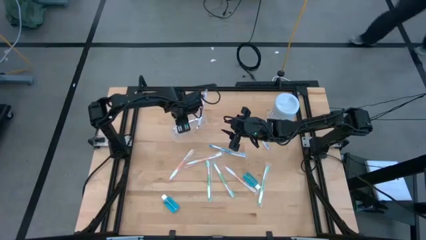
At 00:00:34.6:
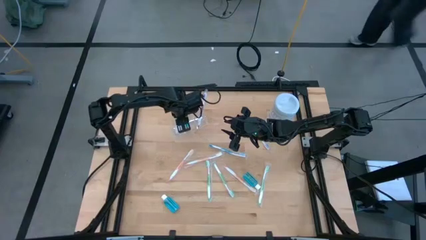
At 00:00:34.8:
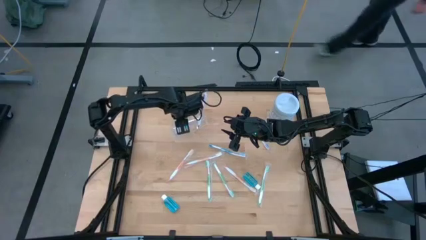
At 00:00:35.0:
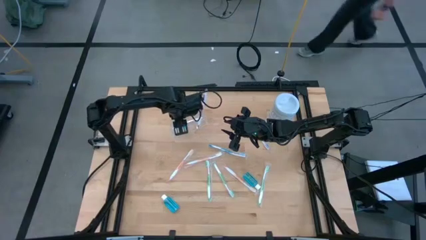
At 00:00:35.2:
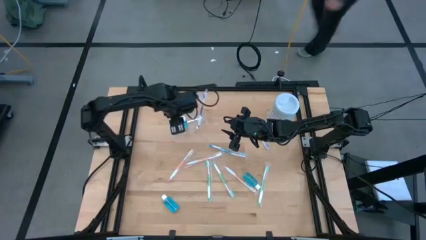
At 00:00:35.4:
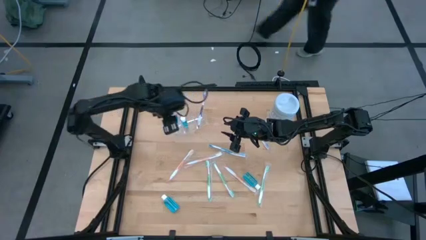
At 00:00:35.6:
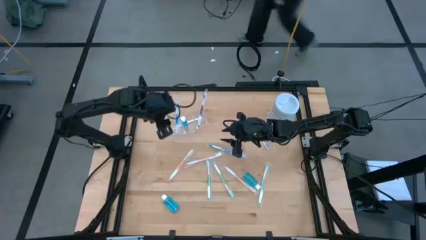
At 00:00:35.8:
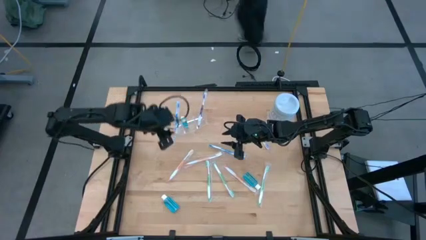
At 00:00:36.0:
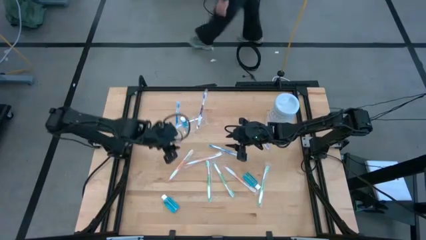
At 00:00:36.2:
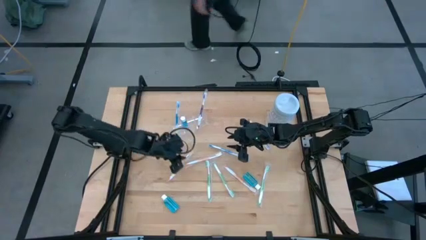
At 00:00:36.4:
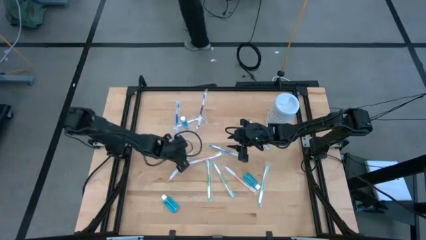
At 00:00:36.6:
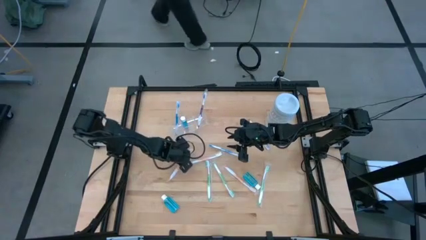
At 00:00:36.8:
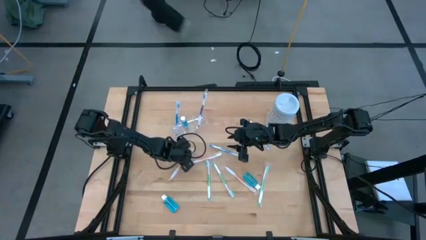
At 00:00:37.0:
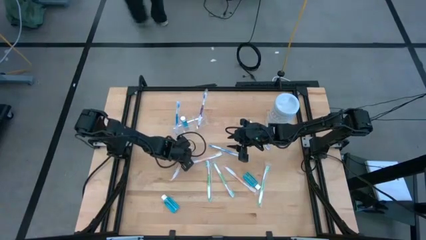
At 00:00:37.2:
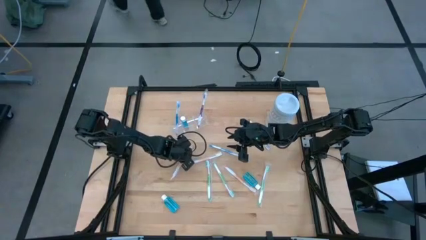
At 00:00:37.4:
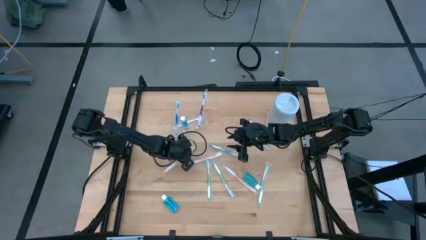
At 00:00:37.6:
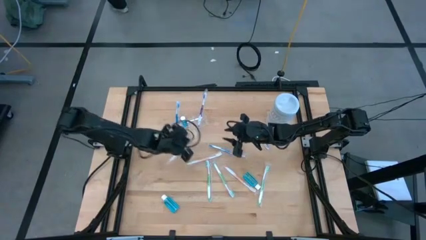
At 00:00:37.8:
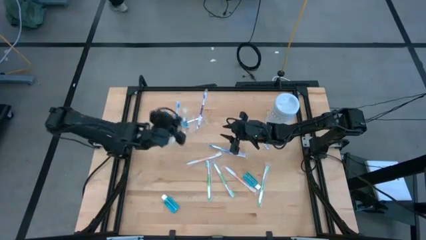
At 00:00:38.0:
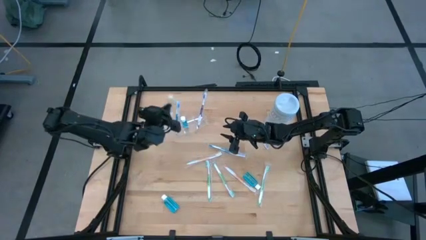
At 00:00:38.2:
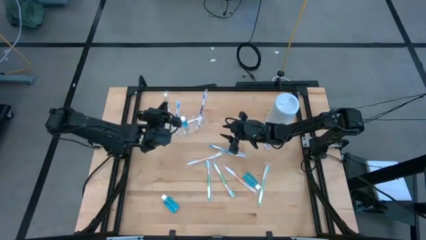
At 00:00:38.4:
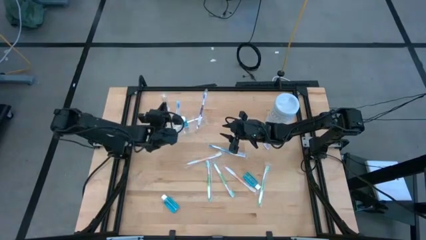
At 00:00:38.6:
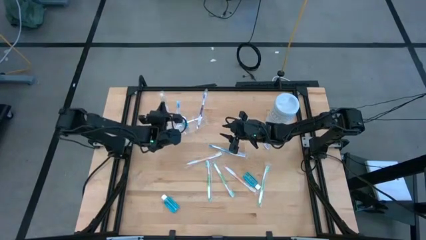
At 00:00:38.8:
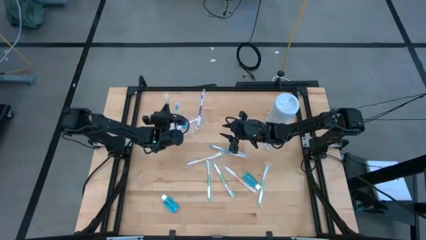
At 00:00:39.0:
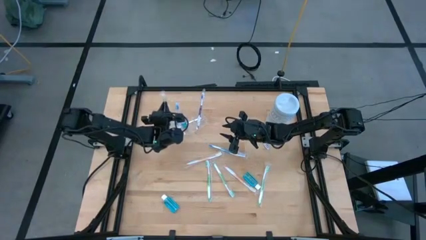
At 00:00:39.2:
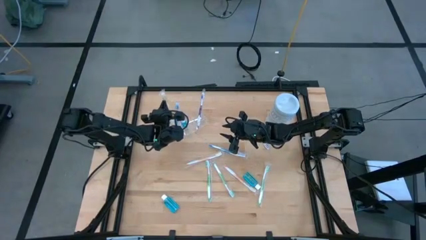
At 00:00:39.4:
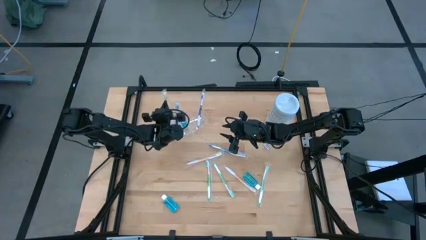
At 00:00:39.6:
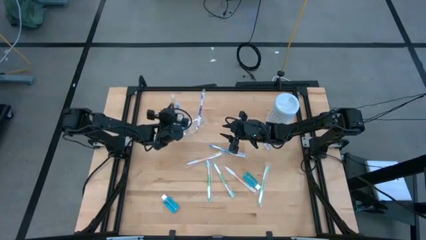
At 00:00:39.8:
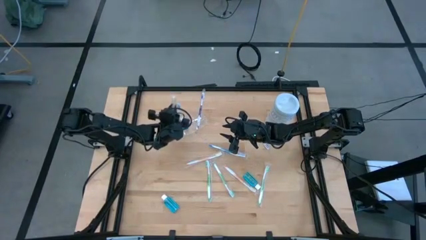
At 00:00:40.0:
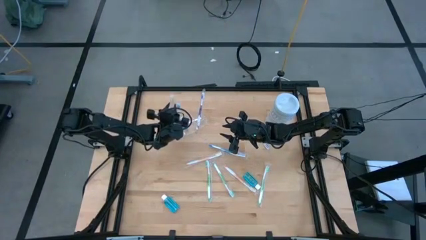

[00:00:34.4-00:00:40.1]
Task: Pick & Place toothbrushing station
Put the top left orange toothbrush into the transparent organizer

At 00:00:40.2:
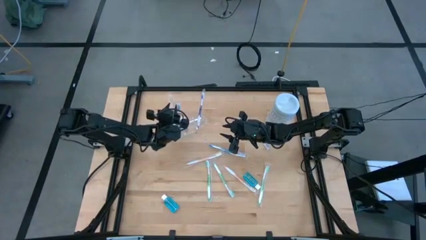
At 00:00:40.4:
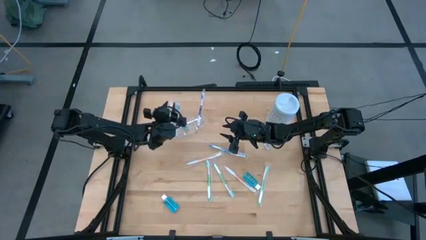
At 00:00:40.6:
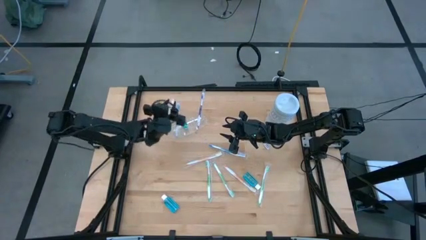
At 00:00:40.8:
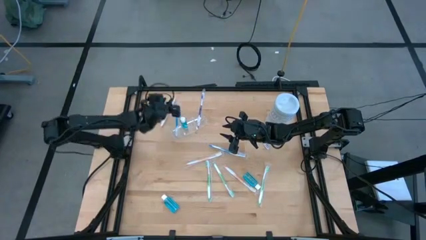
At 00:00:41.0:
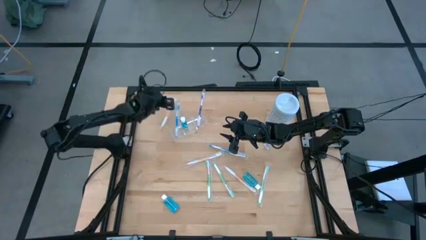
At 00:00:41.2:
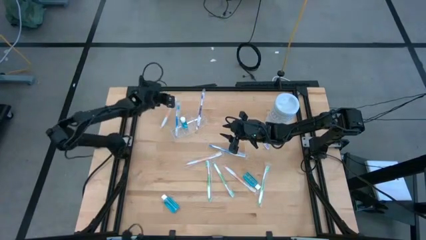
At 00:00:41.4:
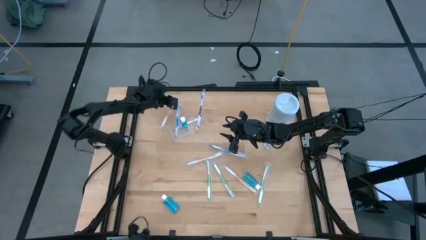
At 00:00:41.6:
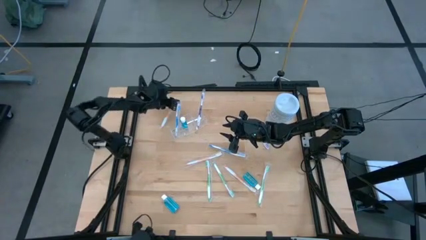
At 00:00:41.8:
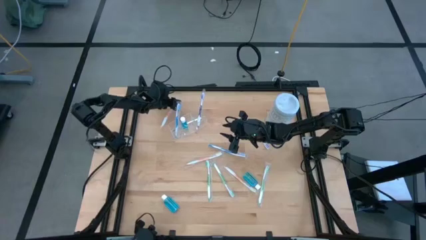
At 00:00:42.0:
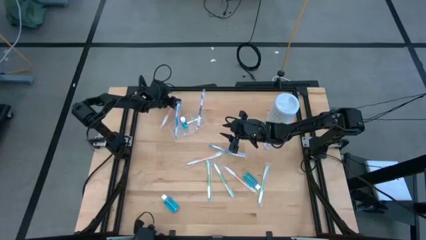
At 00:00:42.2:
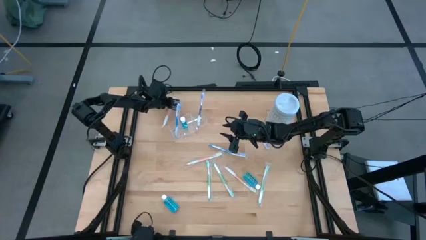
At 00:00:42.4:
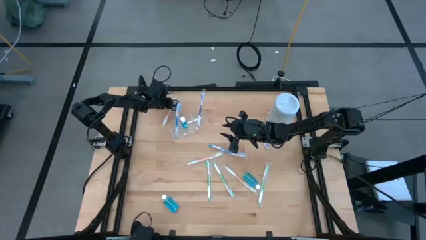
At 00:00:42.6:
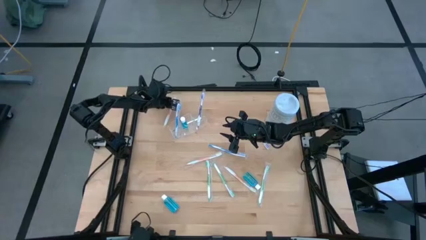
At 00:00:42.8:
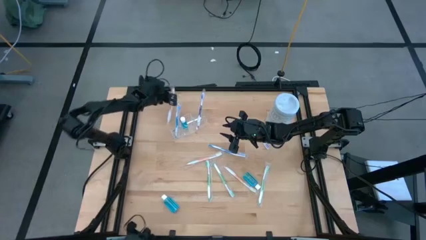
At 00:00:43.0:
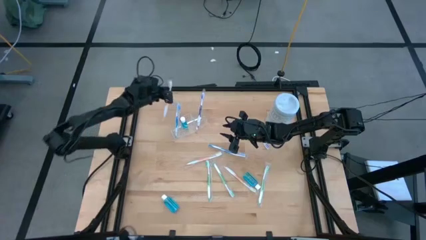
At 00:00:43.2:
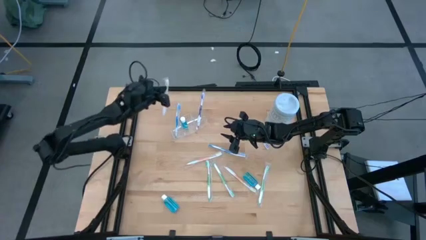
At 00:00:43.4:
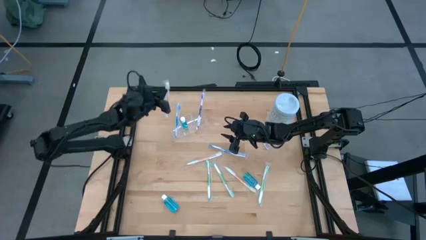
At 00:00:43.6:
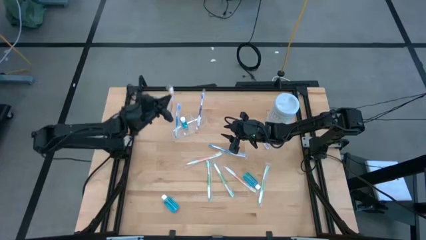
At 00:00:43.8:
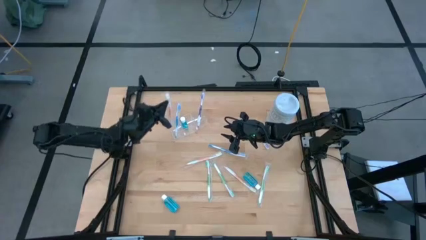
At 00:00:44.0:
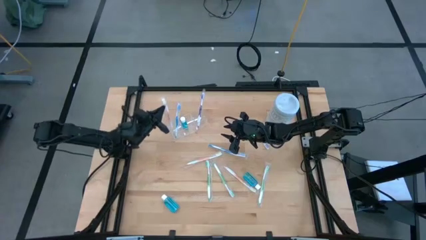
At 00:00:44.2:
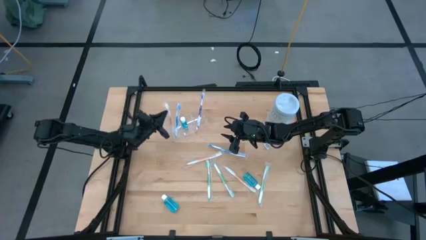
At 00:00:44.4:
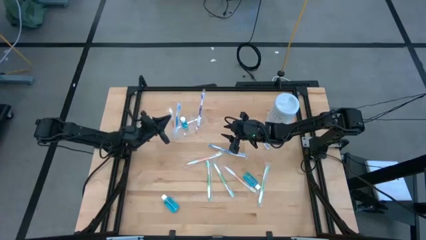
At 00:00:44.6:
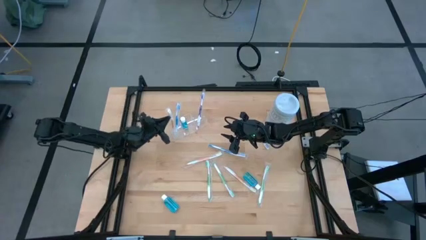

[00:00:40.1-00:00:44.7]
Put the top left orange toothbrush into the transparent organizer

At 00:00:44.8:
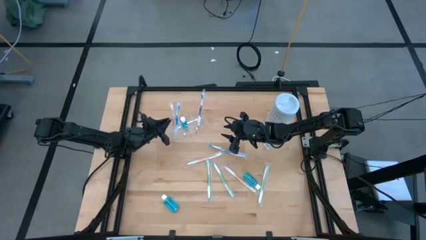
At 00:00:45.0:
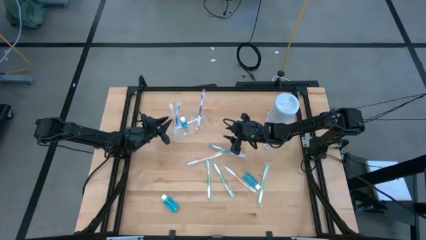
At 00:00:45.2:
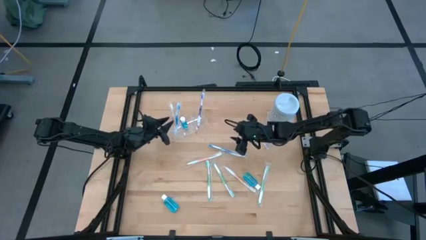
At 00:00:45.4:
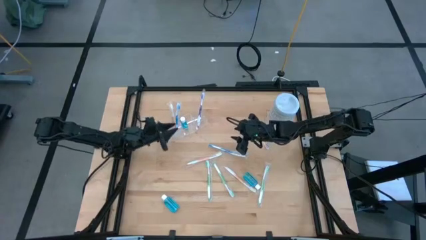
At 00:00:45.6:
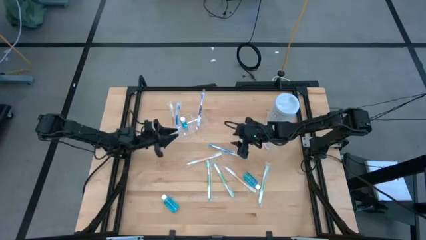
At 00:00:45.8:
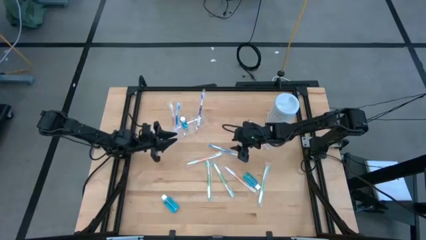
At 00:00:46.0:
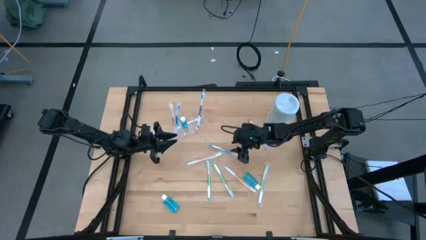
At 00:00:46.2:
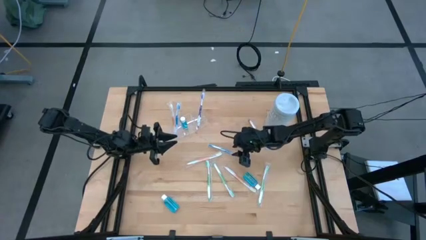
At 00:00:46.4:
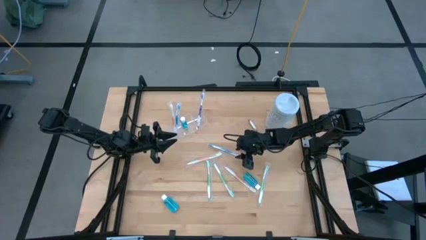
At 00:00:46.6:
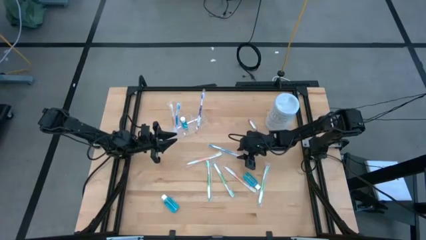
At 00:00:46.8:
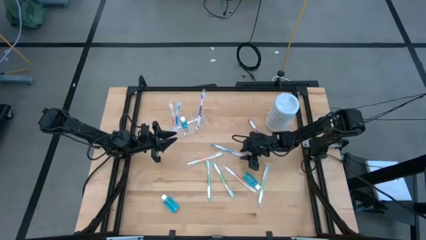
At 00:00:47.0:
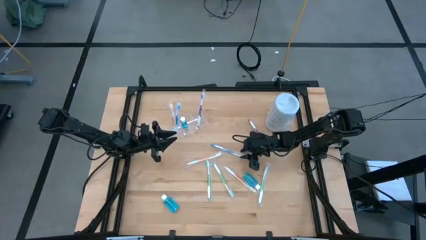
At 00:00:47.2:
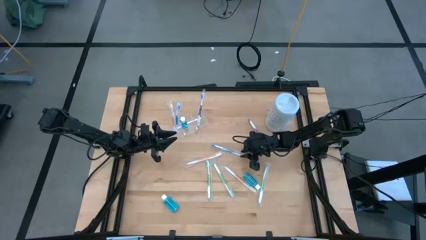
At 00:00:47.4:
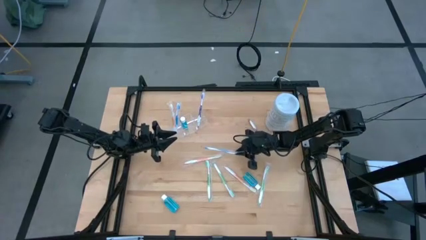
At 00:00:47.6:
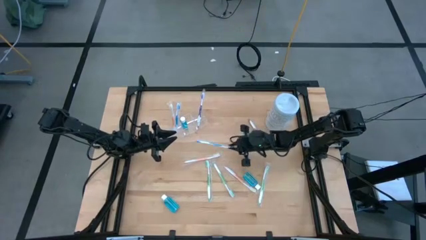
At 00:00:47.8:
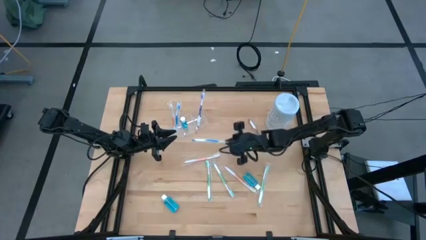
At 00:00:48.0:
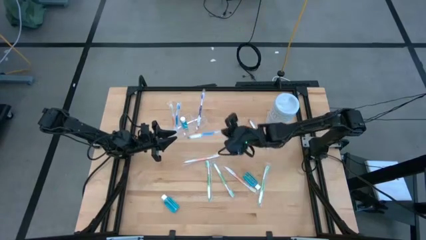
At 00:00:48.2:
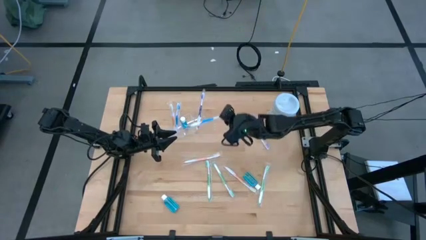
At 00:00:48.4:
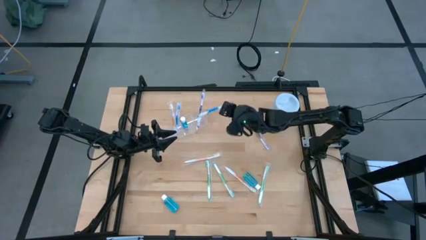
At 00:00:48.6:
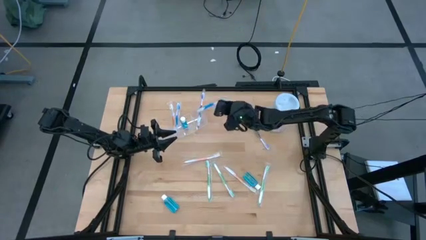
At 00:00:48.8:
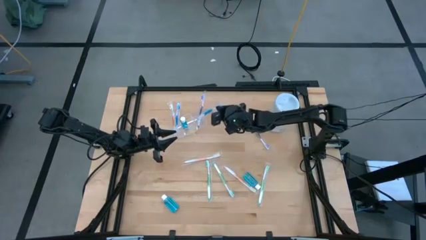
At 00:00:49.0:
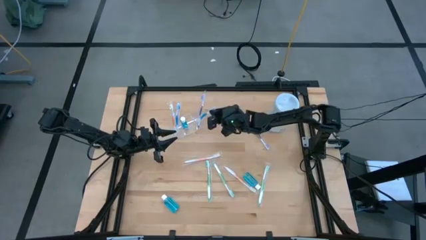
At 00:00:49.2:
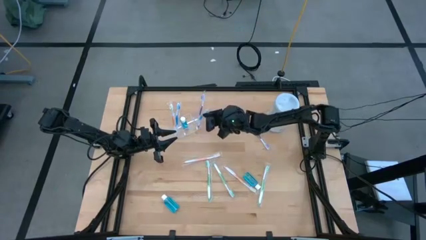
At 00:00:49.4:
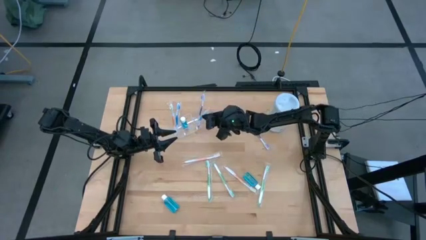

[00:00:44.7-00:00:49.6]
Put the blue toothbrush into the transparent organizer
